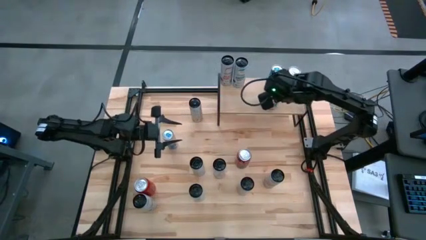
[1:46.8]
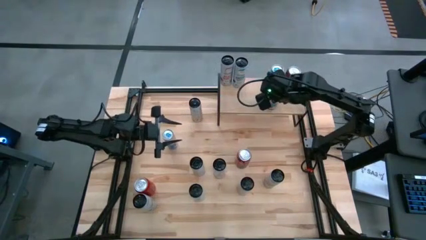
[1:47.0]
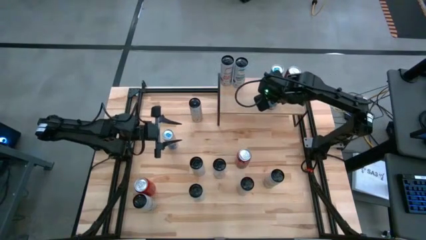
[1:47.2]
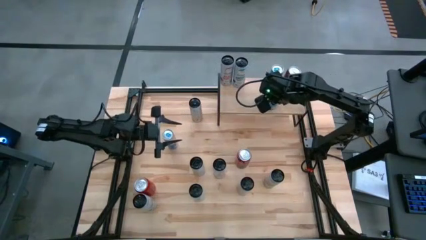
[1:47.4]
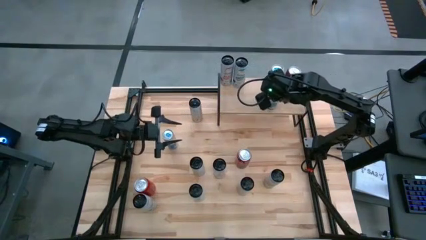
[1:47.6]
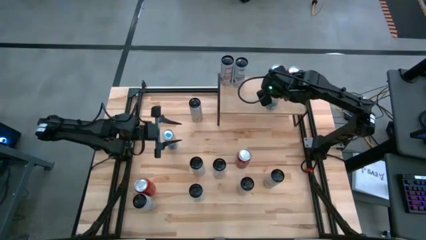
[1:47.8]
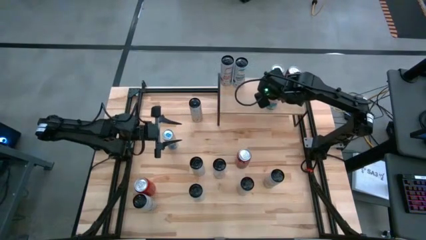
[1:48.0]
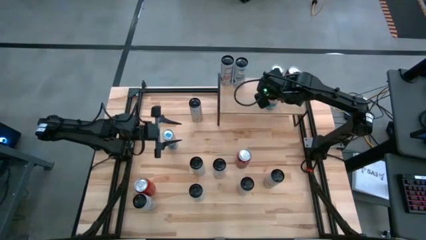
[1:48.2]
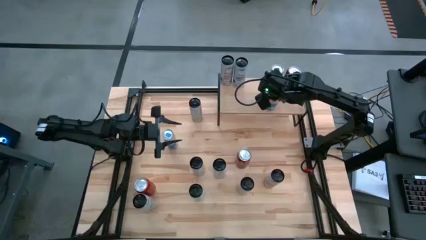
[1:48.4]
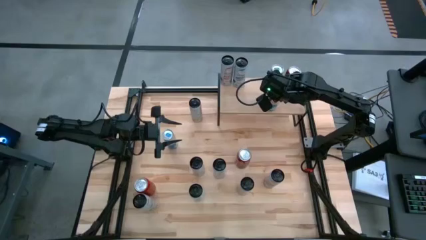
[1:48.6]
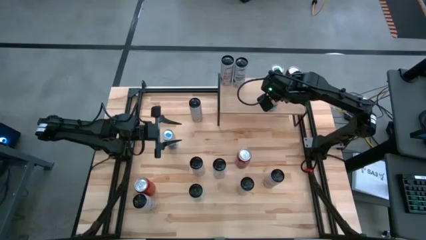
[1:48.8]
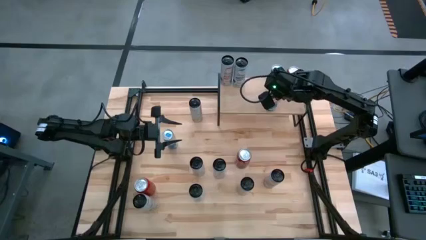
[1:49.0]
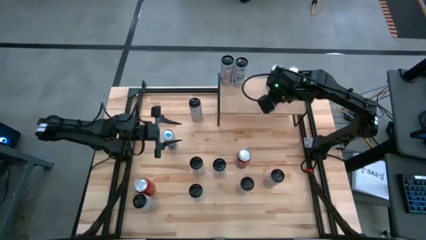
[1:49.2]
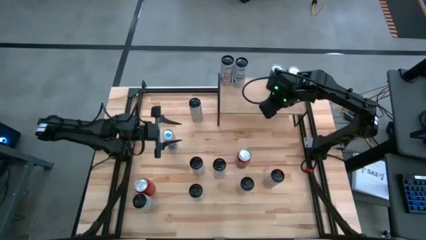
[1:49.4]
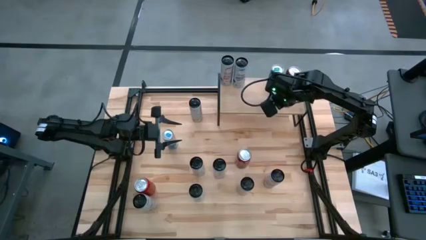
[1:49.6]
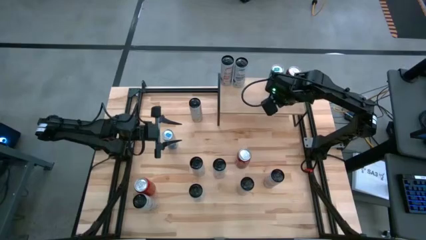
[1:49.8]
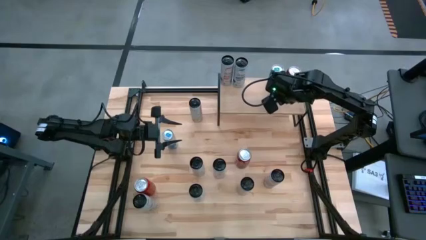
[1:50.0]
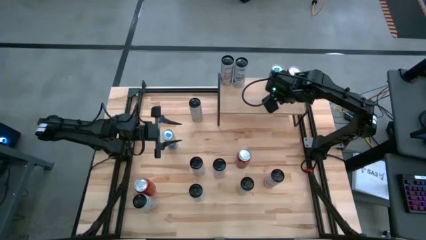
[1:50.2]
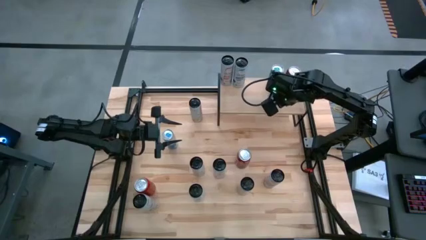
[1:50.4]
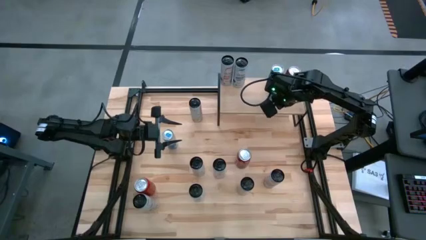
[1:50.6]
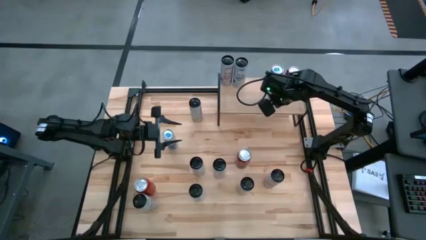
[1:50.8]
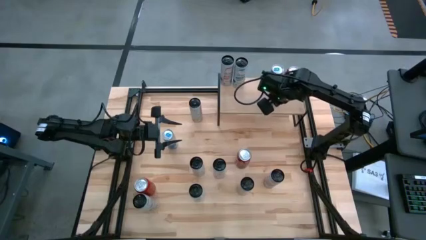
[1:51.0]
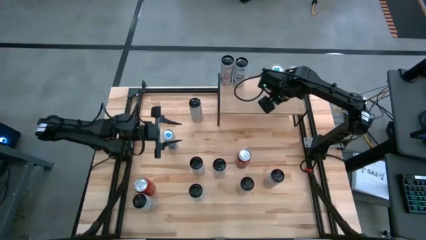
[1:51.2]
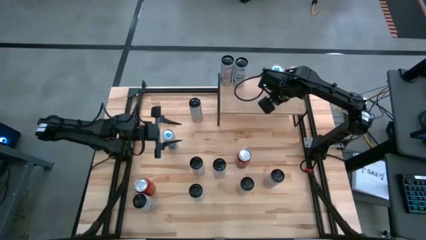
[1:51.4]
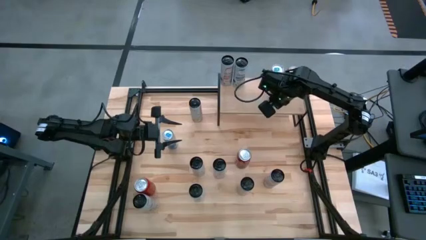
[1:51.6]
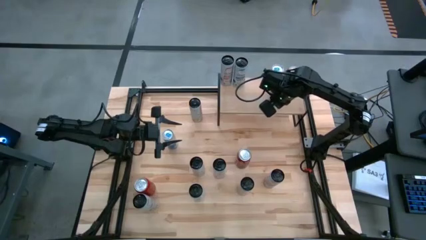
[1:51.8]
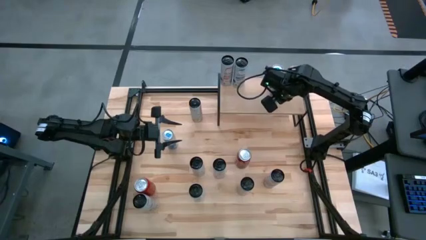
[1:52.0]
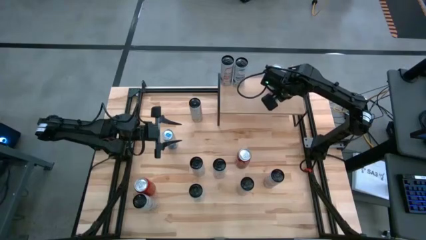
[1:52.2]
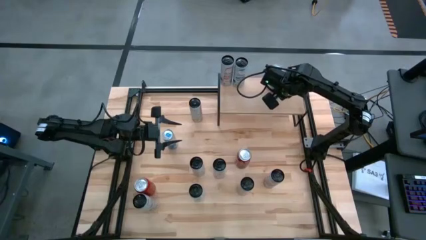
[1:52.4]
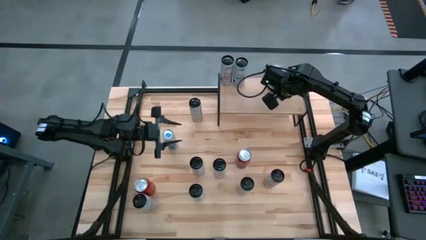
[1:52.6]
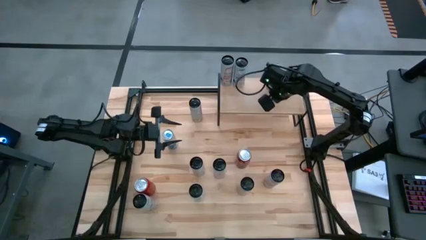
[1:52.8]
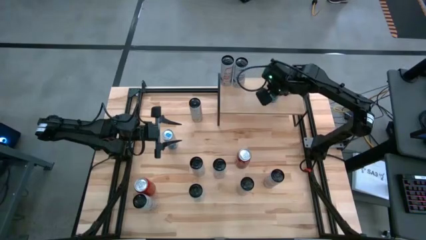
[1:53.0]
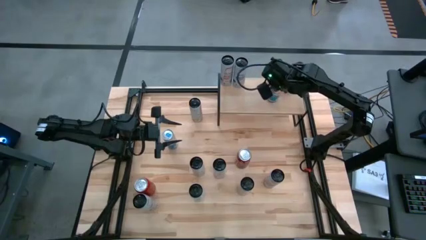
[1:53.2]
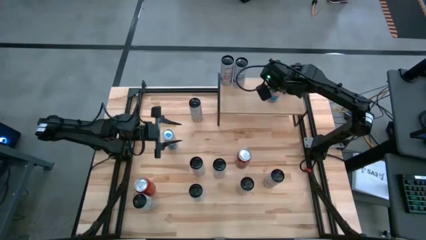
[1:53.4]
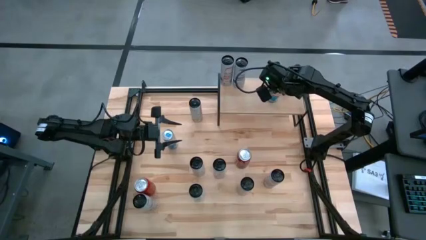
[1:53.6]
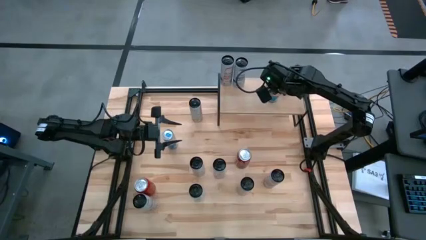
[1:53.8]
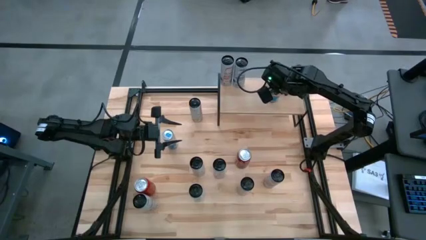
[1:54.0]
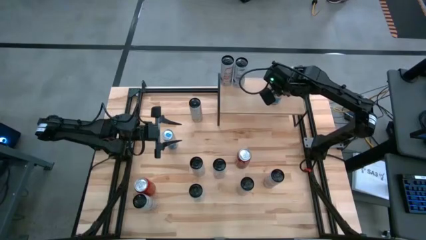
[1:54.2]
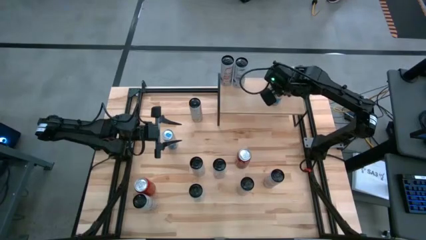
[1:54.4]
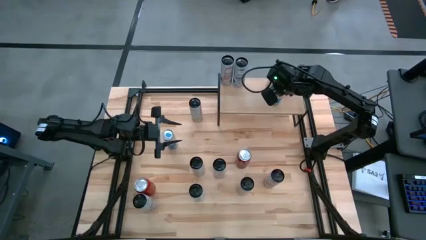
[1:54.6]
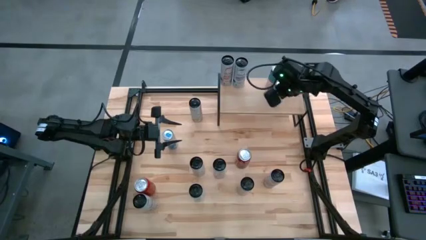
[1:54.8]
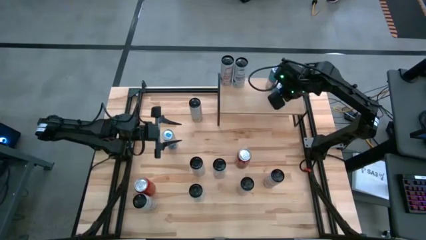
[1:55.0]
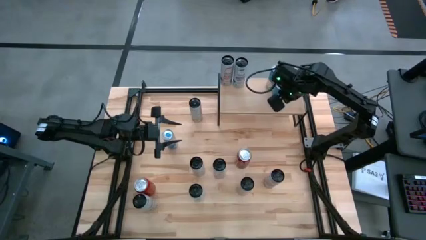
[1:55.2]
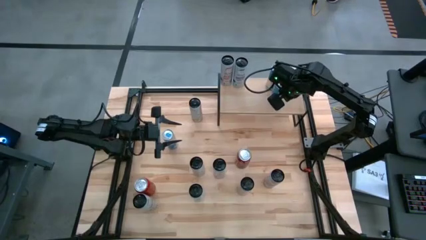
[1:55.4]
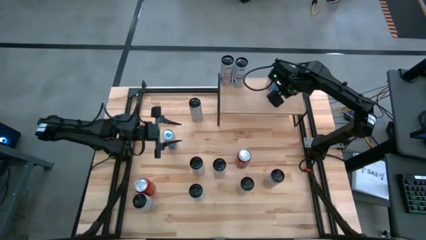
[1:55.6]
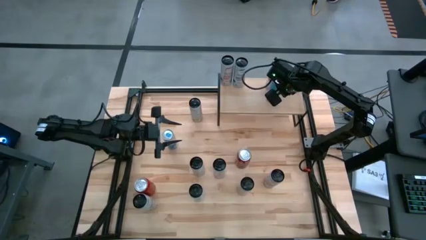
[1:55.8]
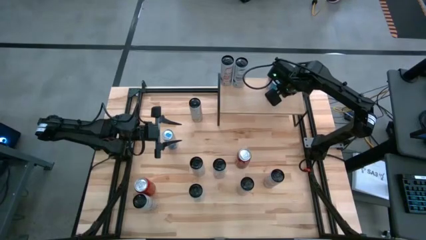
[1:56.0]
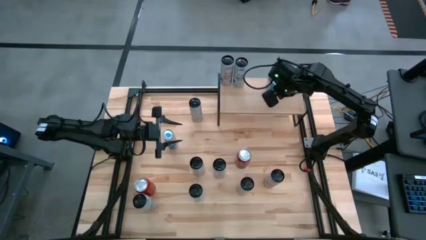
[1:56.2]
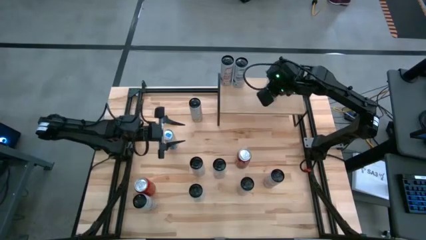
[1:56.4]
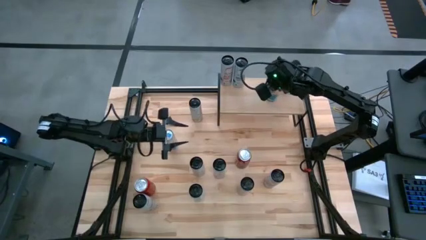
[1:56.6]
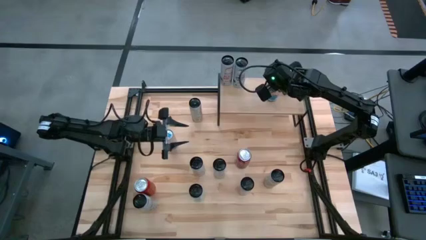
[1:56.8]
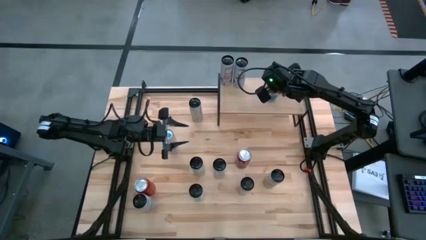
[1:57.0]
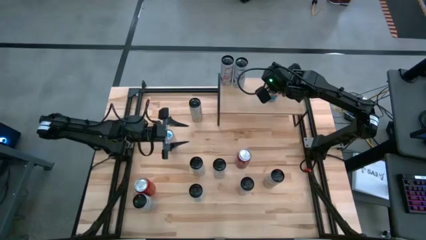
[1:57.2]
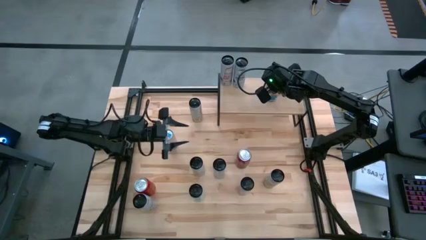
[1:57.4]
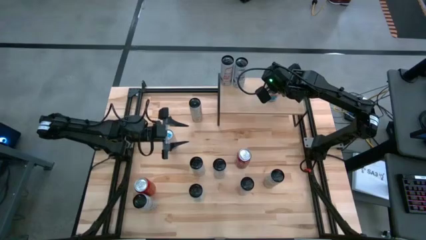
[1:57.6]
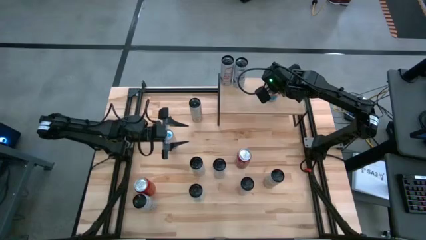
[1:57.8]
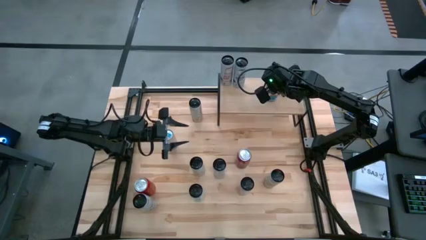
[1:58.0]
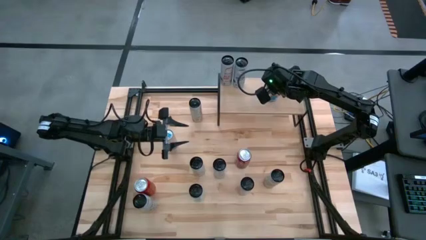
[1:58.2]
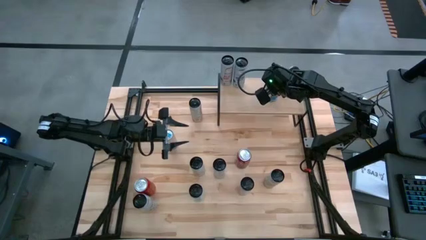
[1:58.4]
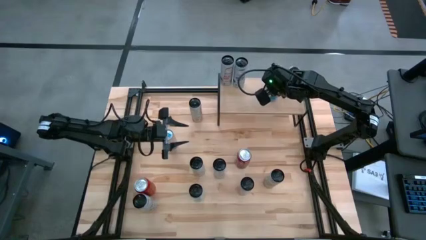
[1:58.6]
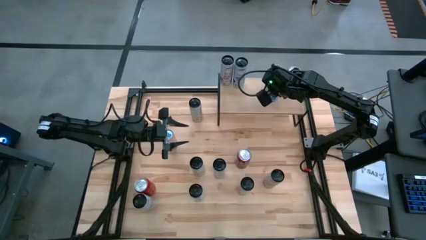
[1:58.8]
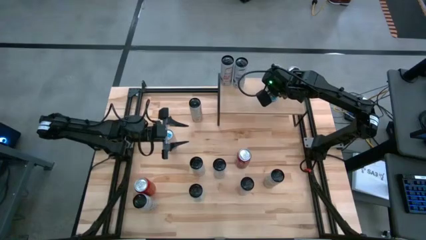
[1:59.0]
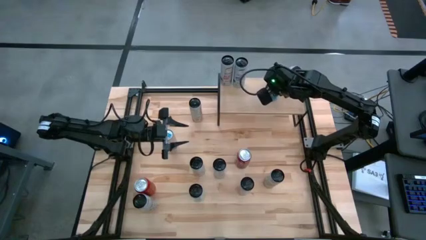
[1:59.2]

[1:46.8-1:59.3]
Task: Place canned beverage on shelf
Put the bottom blue soda can on the shelf aligned with the blue soda can
